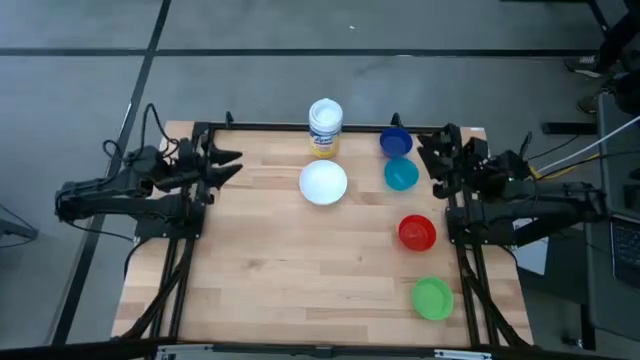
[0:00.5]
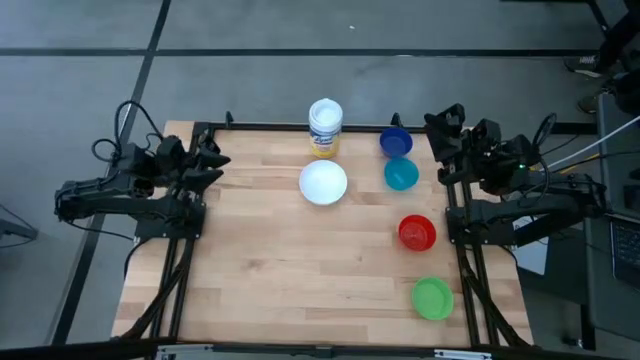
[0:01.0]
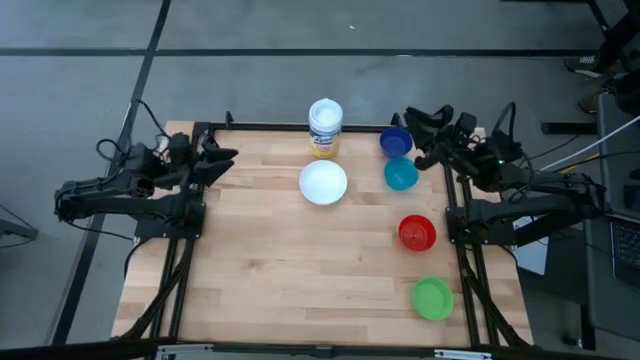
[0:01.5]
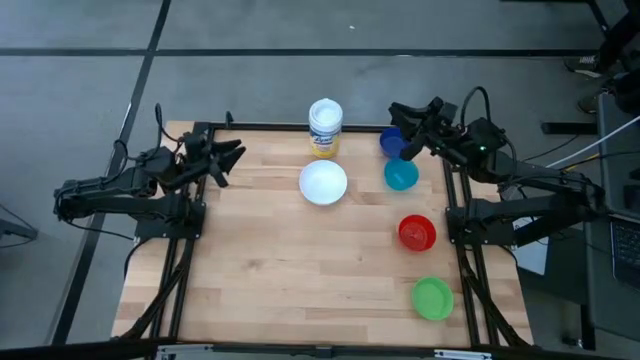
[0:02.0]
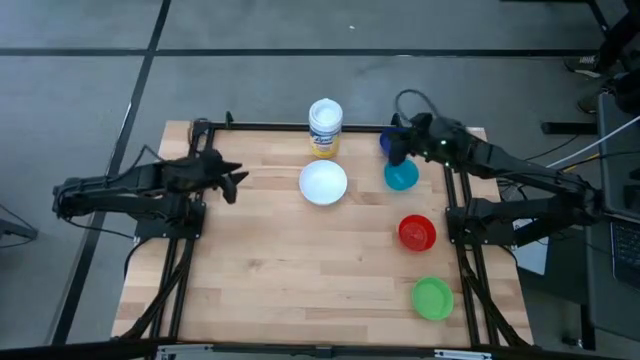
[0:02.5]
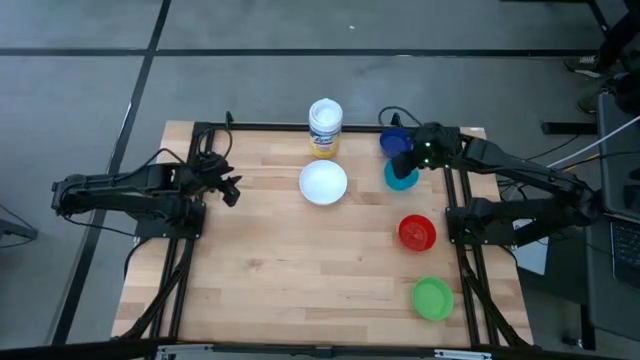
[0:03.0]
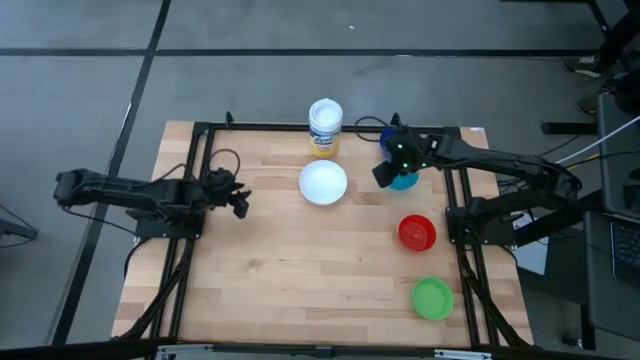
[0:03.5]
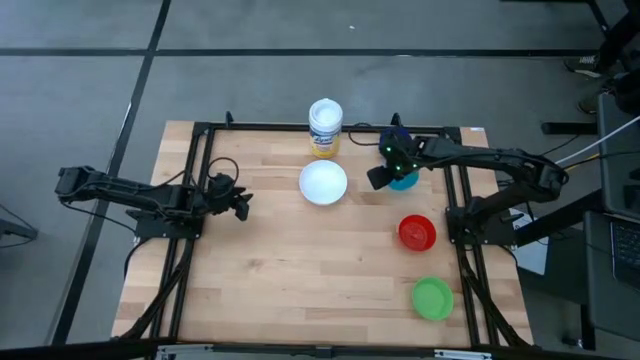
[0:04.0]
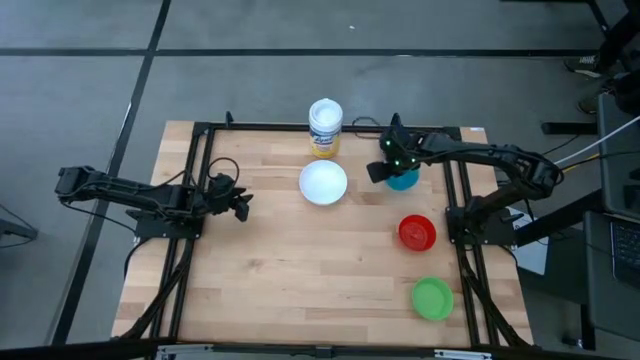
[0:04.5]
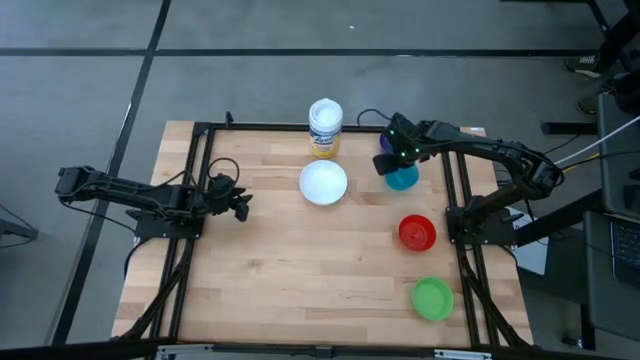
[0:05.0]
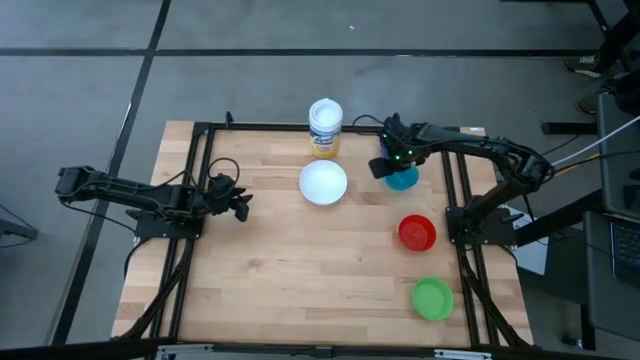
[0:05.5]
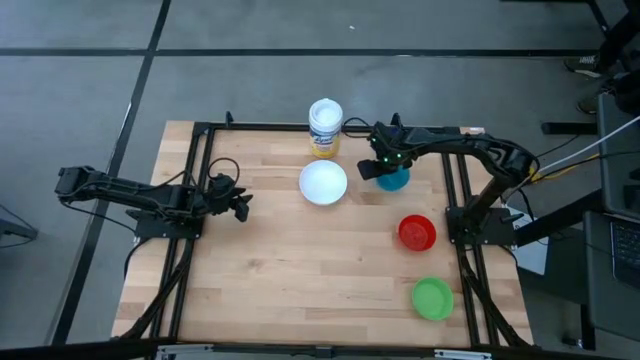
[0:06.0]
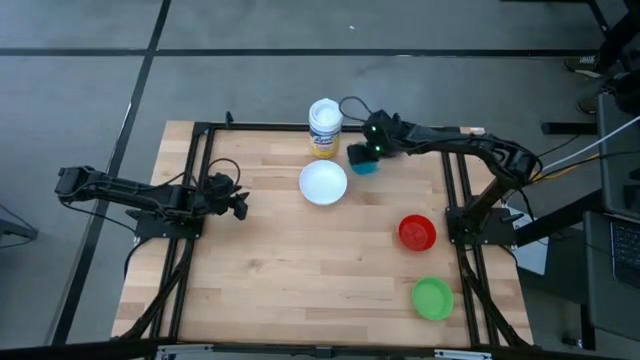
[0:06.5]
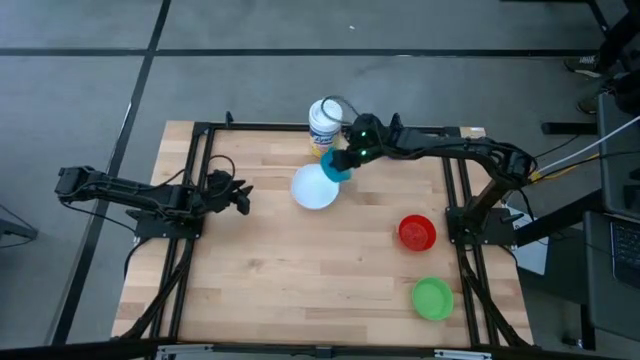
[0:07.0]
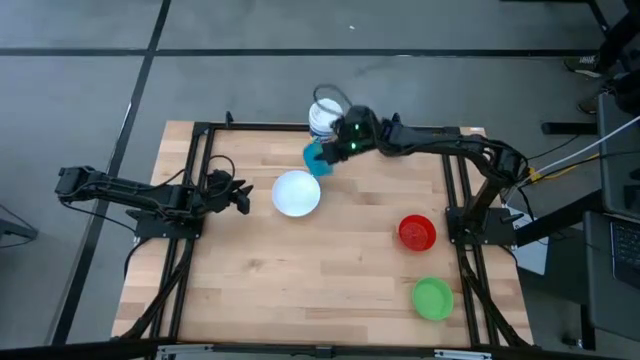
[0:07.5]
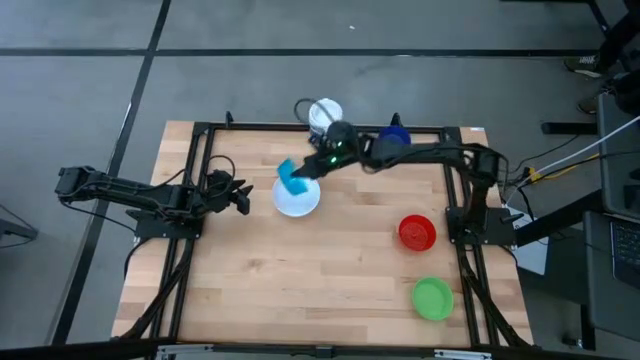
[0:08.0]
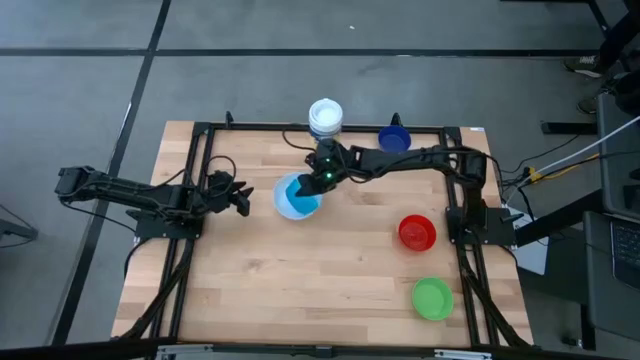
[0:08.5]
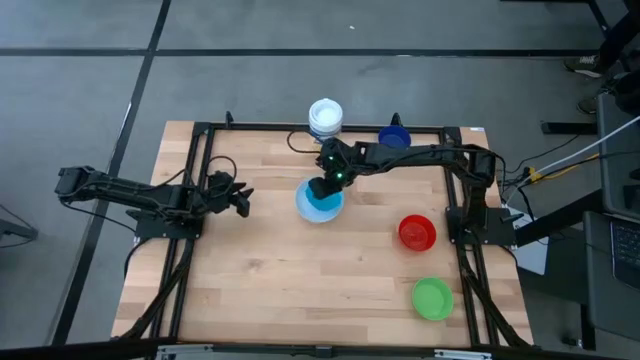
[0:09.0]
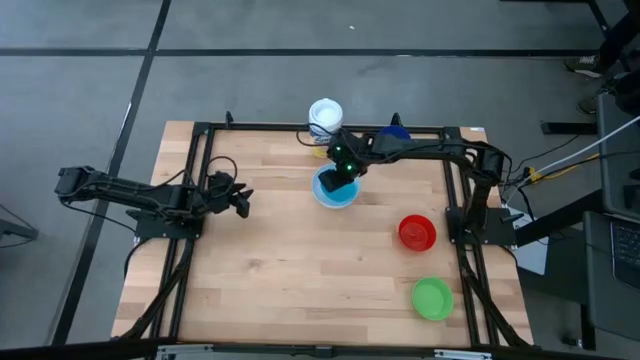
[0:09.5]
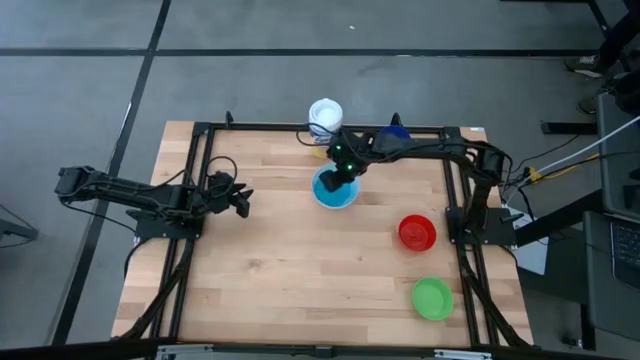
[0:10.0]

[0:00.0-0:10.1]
Stack the light blue bowl on the white bowl

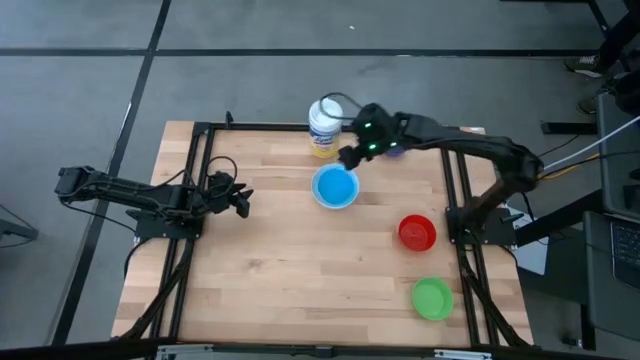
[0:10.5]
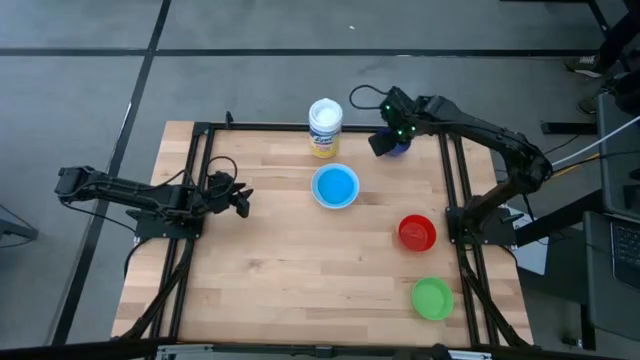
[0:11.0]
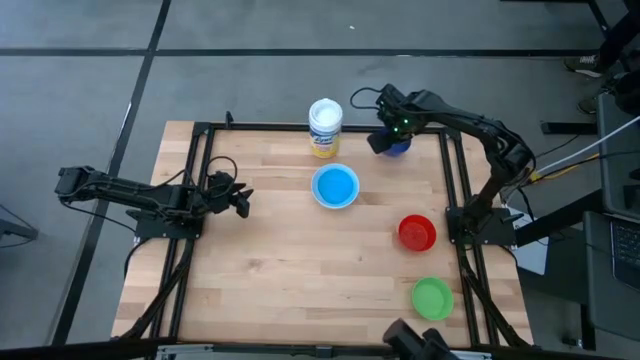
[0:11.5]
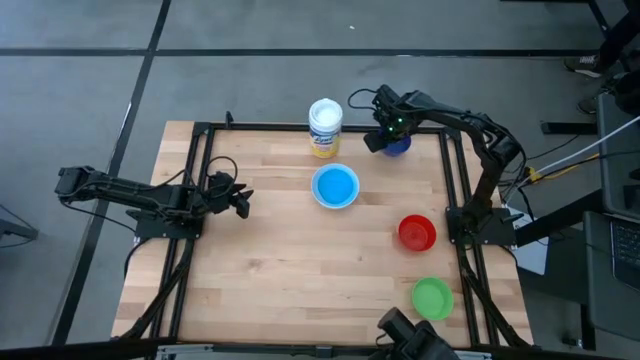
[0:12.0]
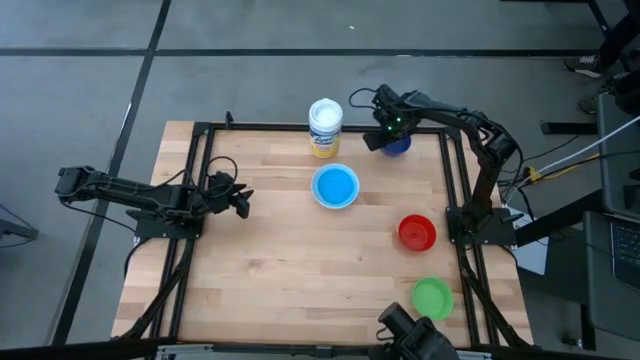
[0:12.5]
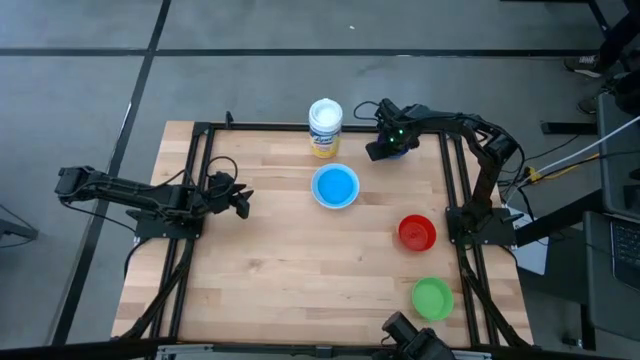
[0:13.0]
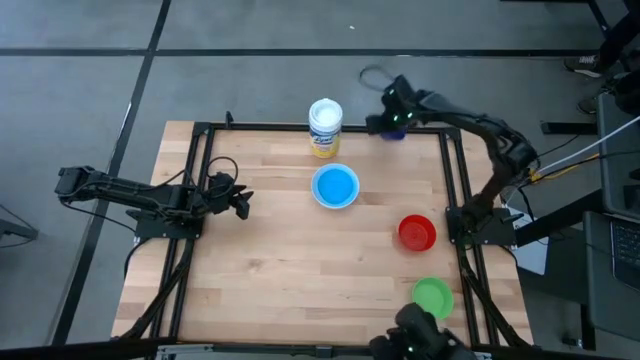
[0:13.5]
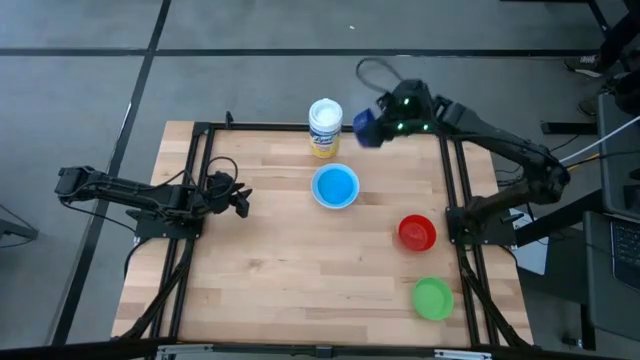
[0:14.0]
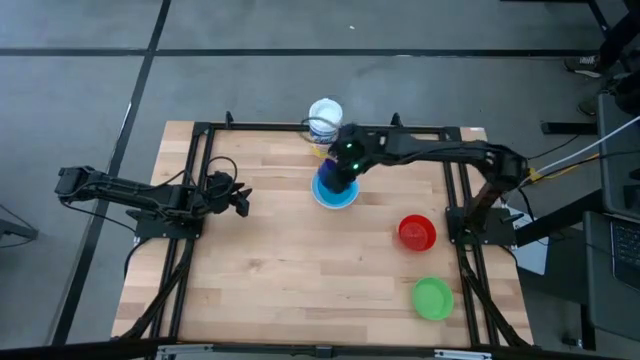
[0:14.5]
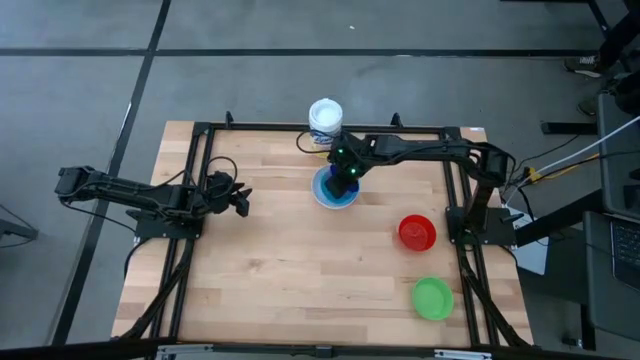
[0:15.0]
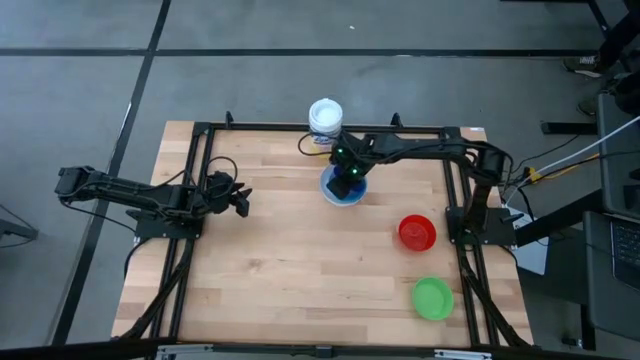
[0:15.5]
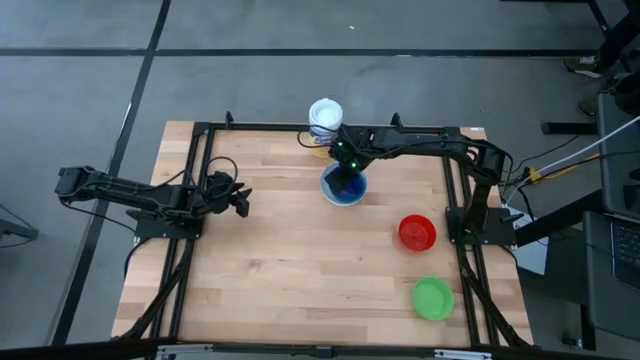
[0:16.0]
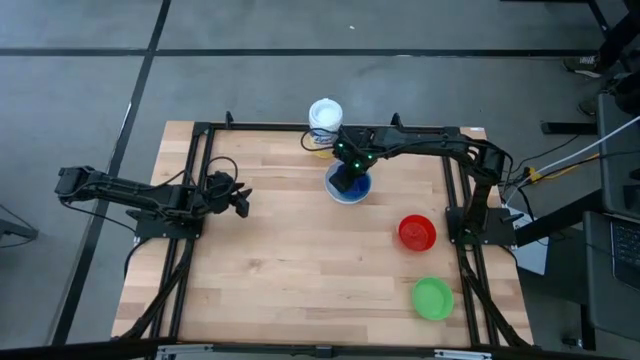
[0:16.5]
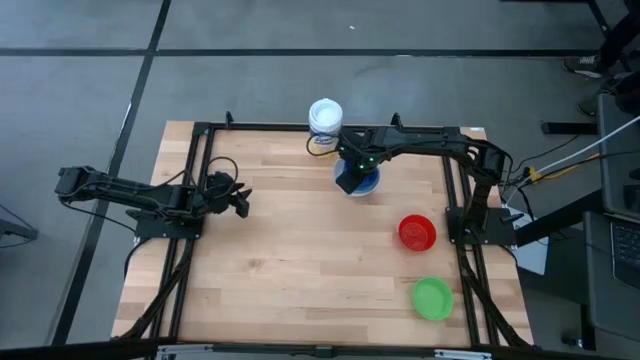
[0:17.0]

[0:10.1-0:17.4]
Stack the blue bowl on the light blue bowl

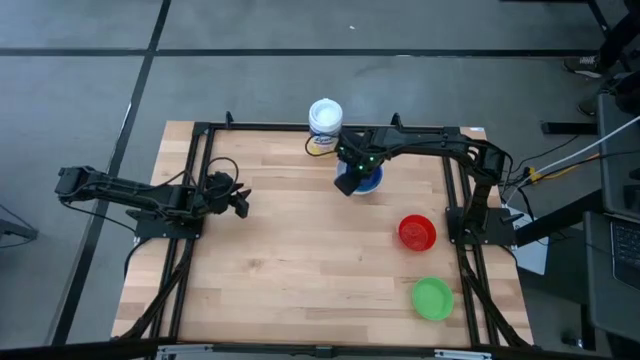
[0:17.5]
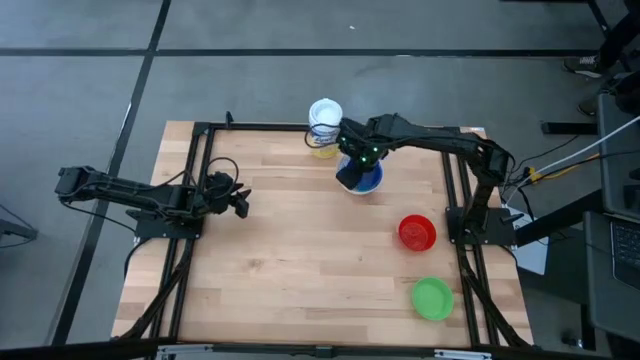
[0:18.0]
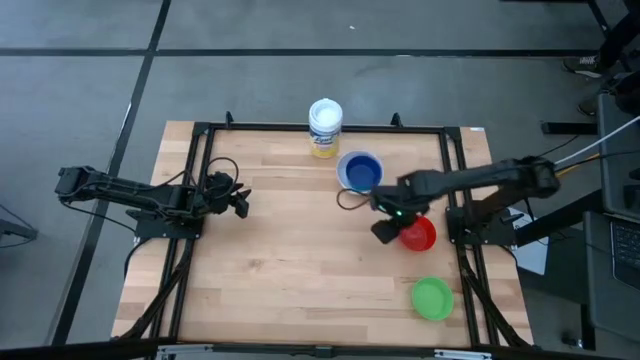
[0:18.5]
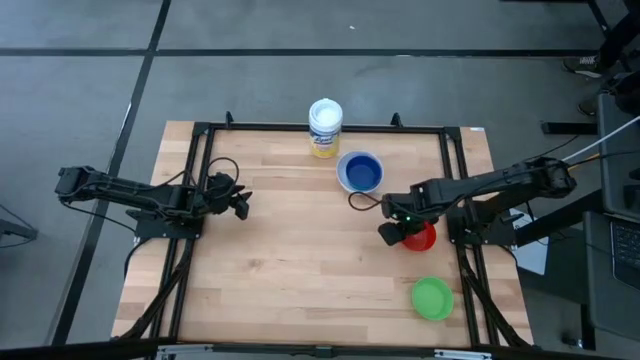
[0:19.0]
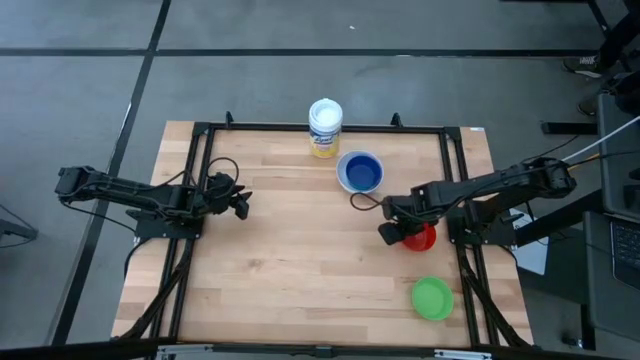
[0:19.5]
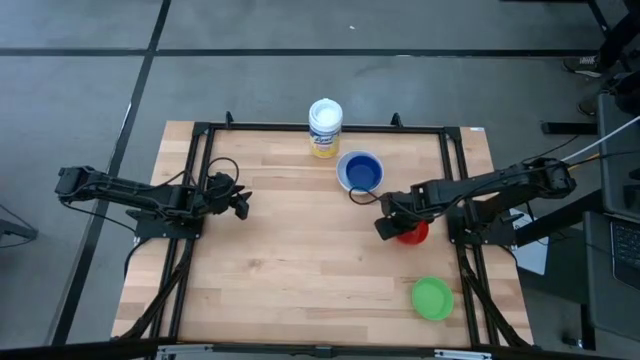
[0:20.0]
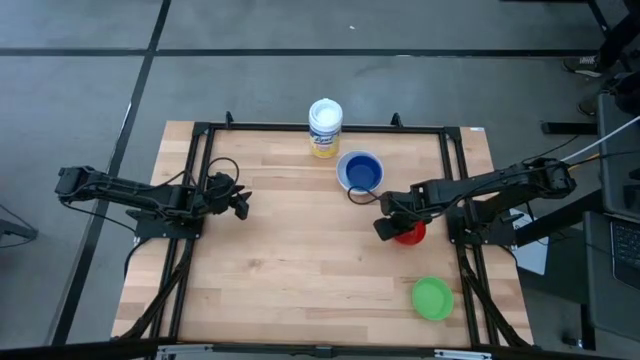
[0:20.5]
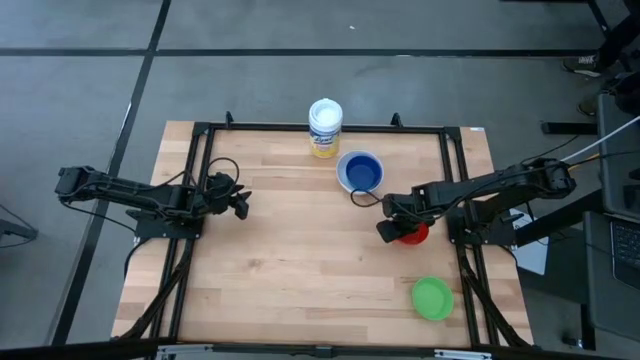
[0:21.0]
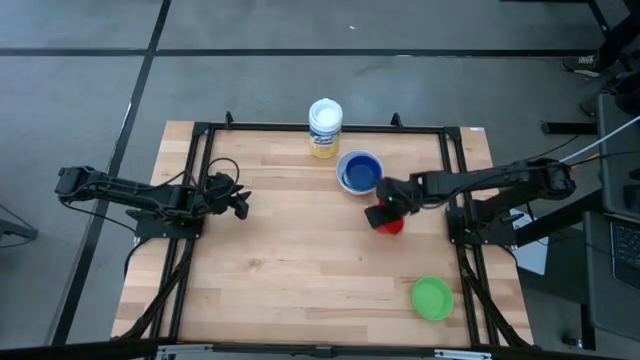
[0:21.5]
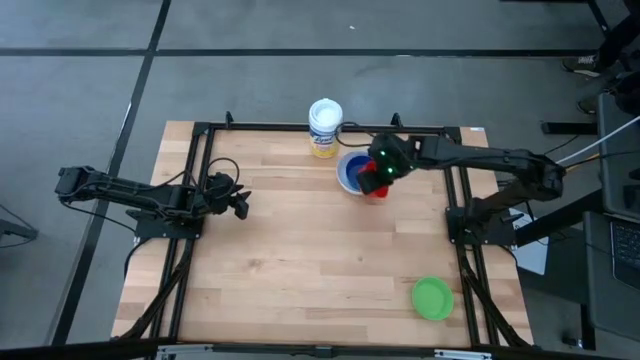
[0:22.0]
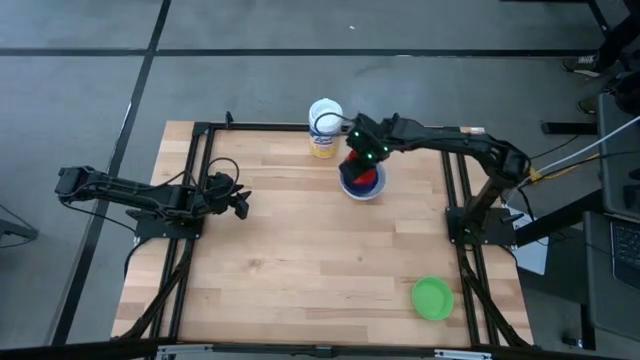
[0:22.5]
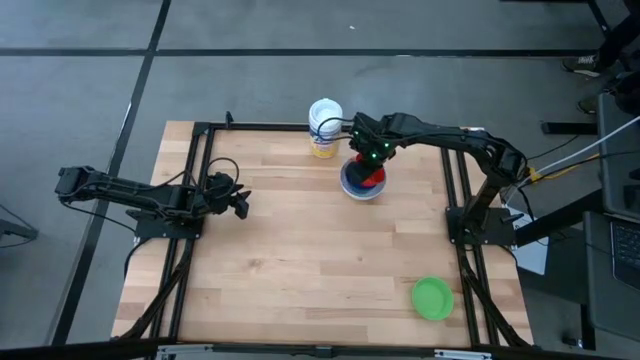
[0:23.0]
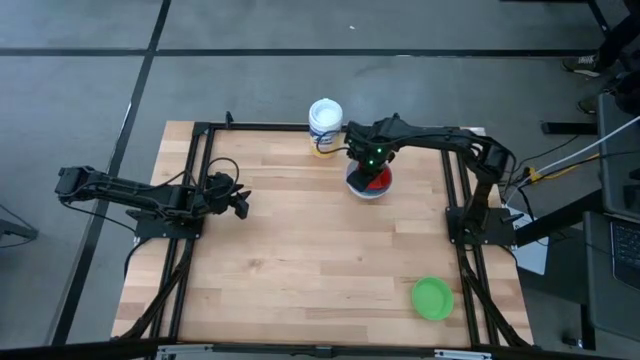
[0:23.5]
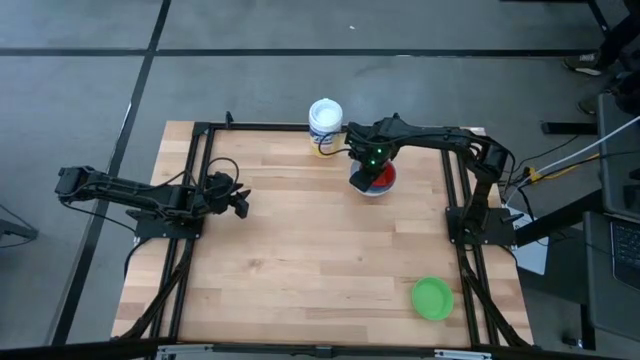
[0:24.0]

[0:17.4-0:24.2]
Stack the red bowl on the blue bowl
